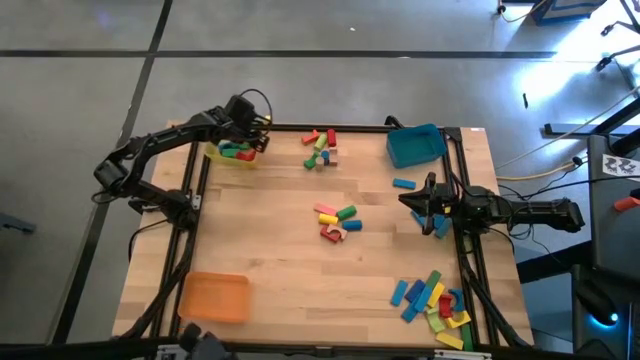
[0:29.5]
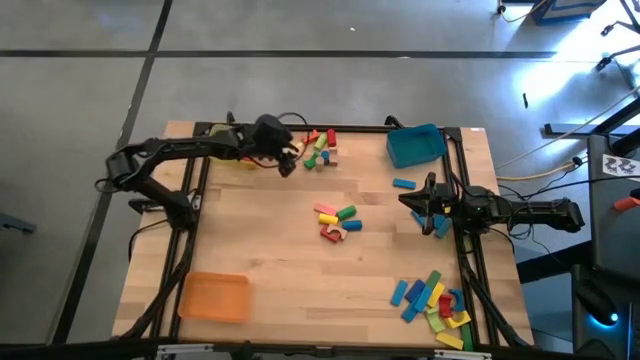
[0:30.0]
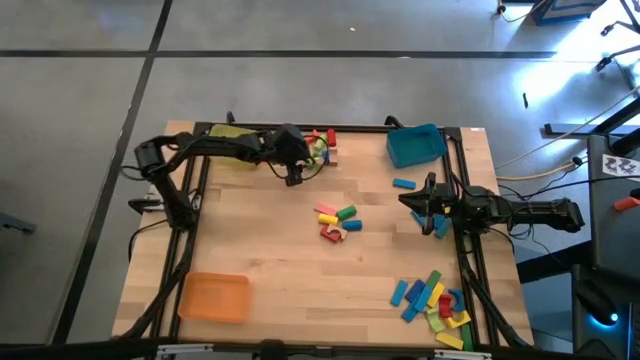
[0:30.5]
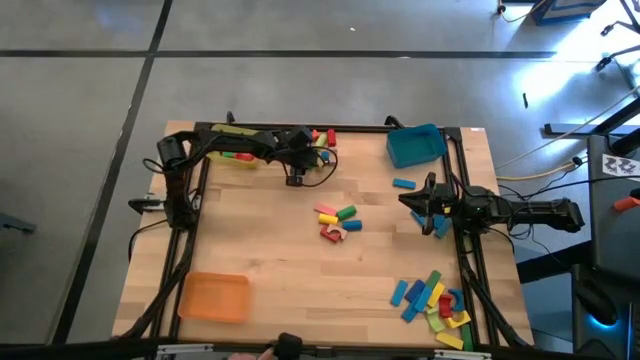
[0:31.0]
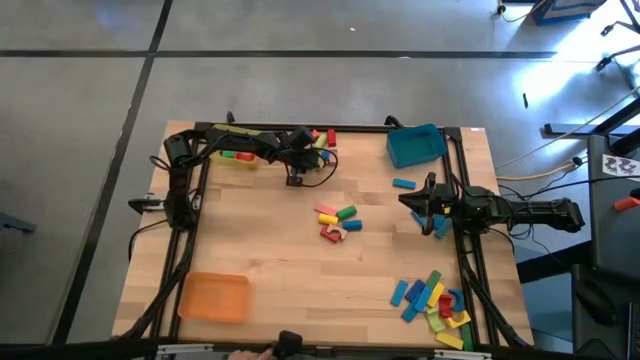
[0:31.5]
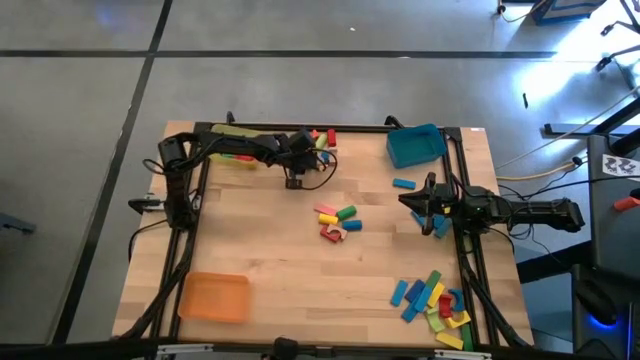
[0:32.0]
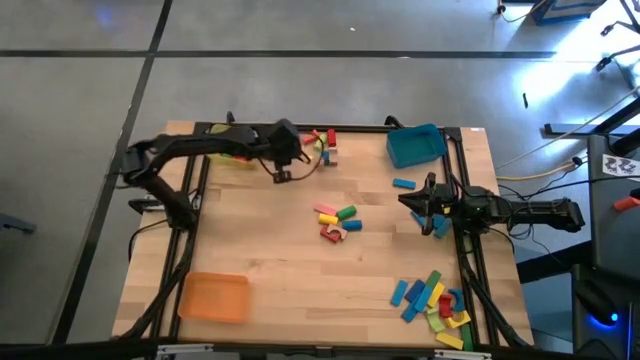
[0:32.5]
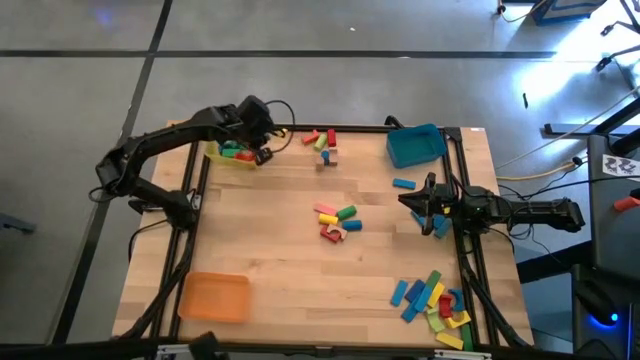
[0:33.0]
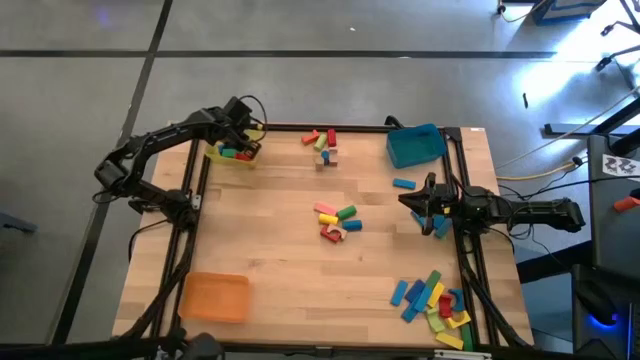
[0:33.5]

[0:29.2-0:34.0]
Task: Sort blocks by size
Put the green arch block into the yellow bin

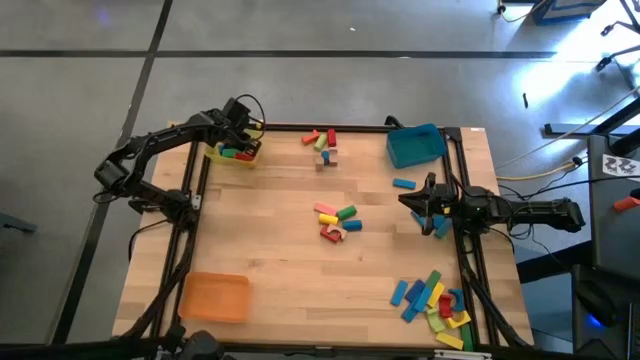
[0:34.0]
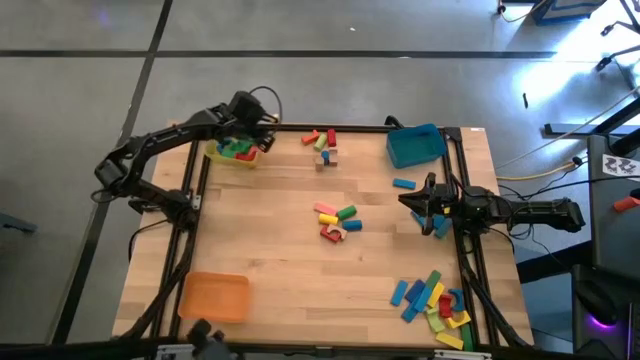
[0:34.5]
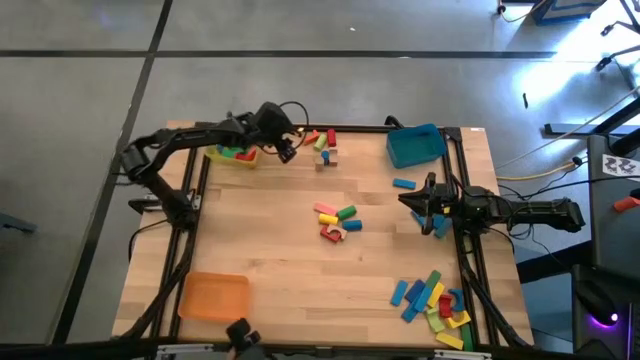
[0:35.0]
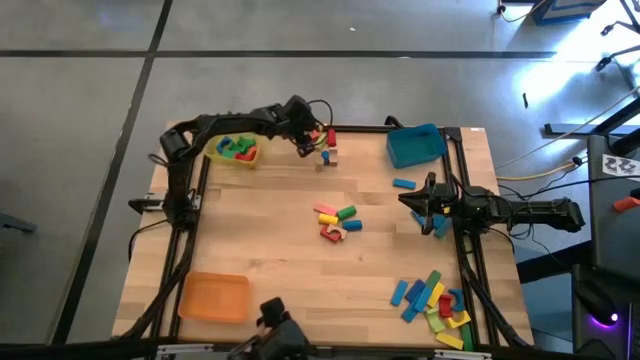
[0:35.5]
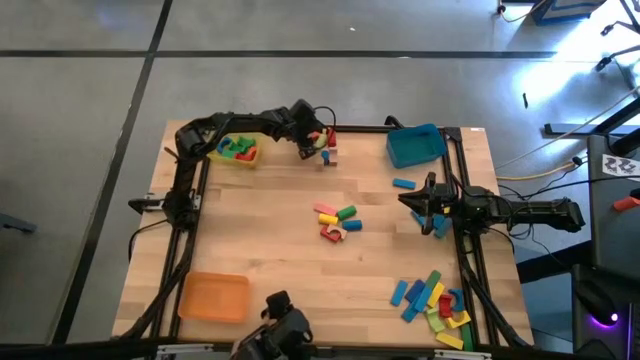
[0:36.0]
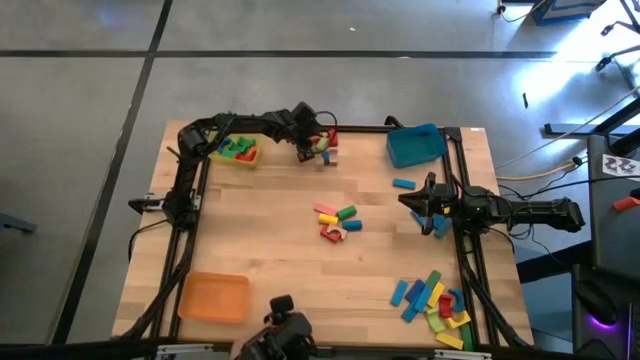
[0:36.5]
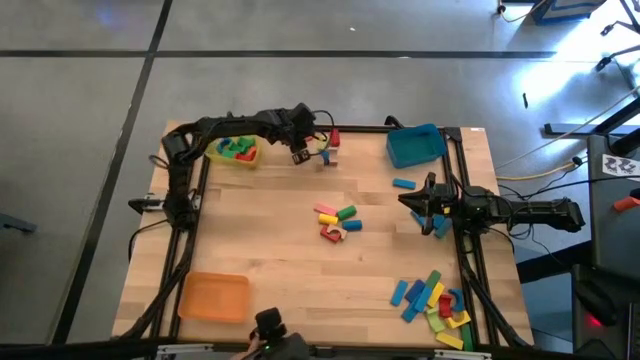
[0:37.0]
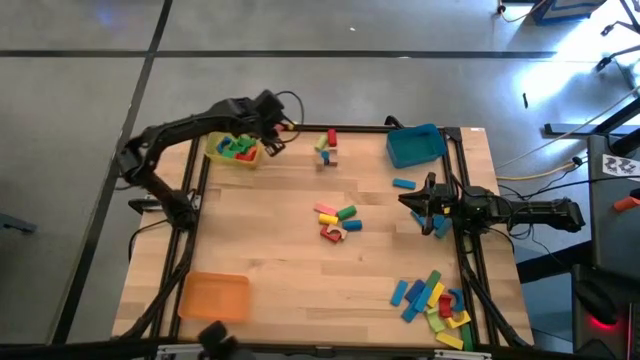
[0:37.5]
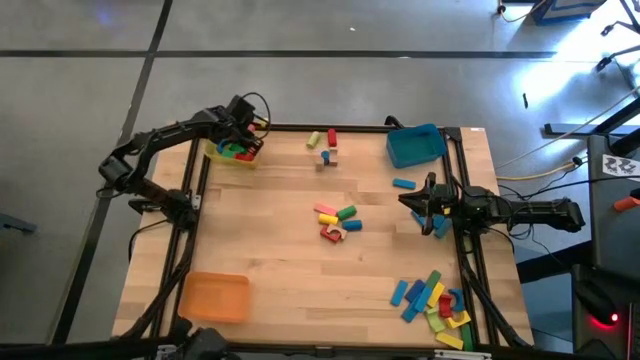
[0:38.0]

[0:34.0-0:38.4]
Put the orange arch block into the yellow bin

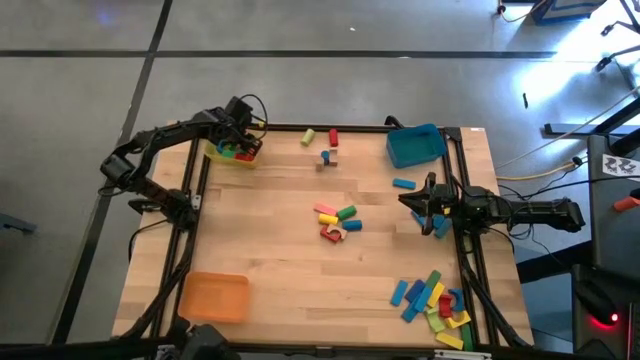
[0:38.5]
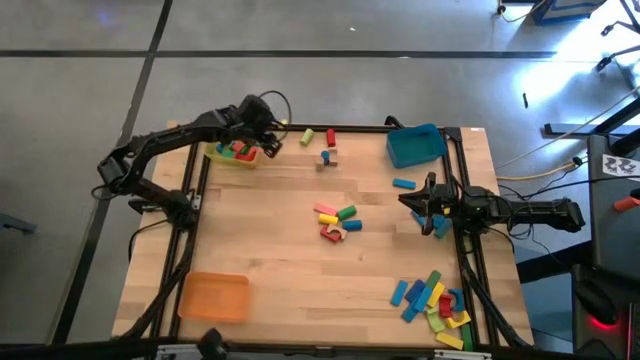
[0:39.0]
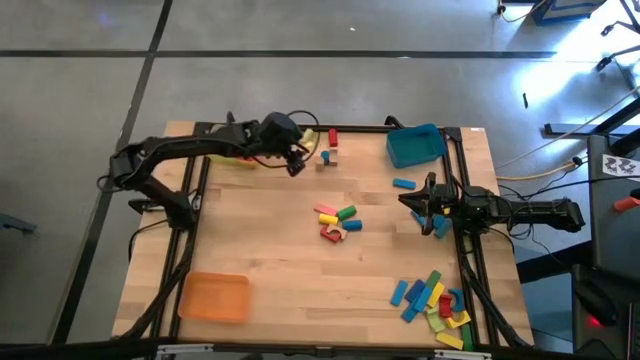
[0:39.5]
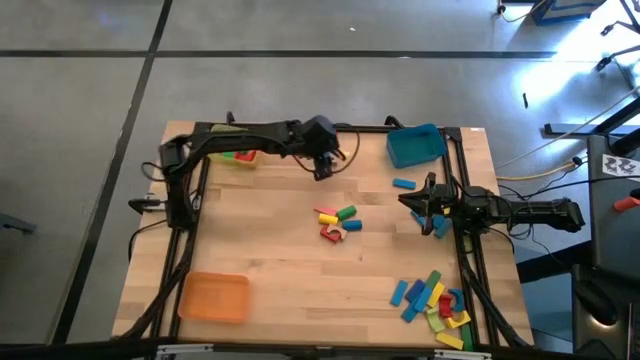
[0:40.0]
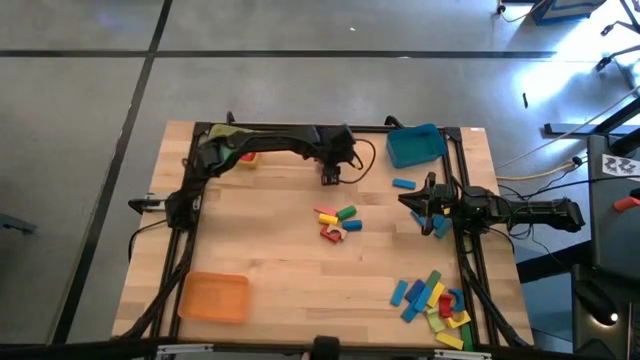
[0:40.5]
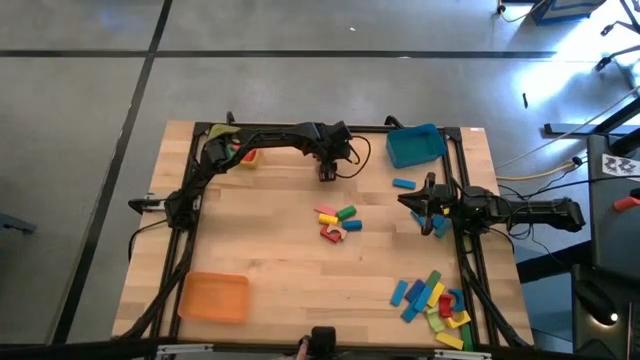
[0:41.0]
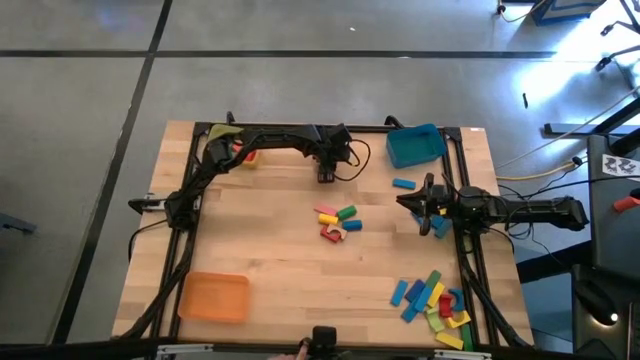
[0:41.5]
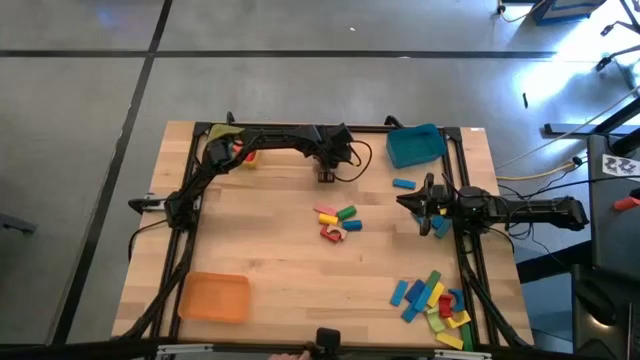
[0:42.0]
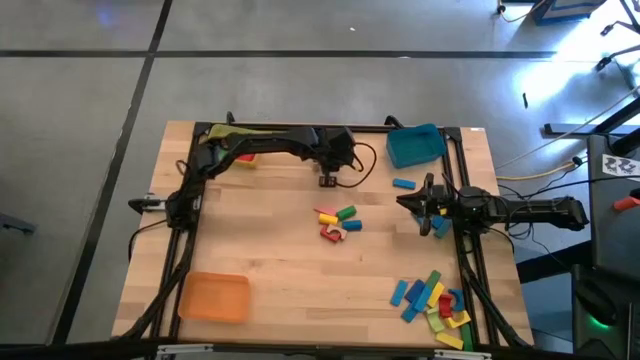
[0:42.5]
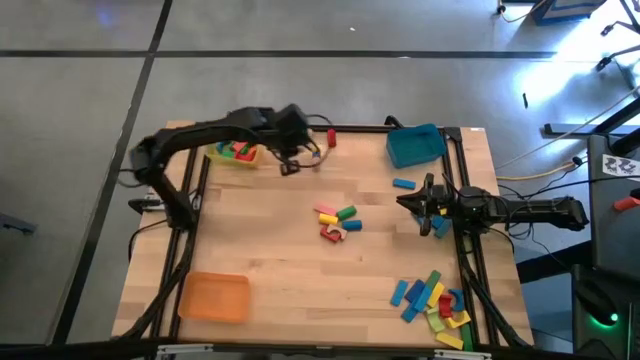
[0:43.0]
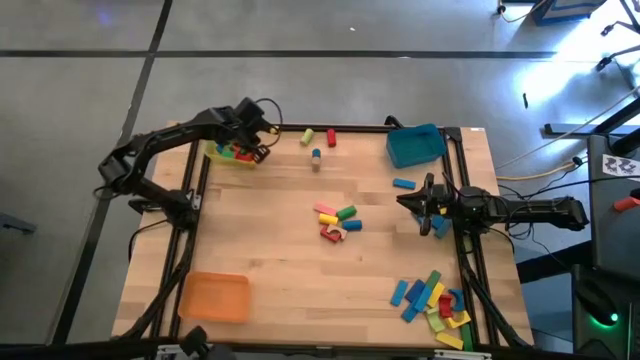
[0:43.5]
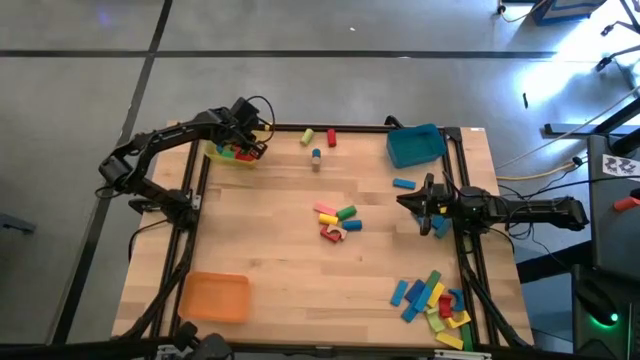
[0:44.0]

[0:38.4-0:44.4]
Put the brown arch block into the yellow bin

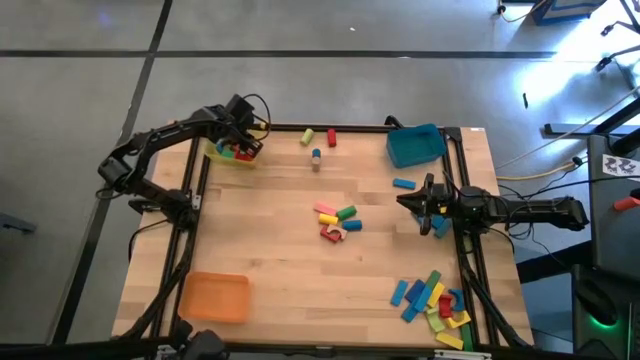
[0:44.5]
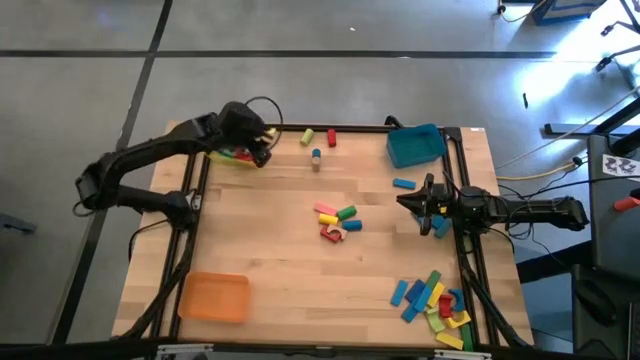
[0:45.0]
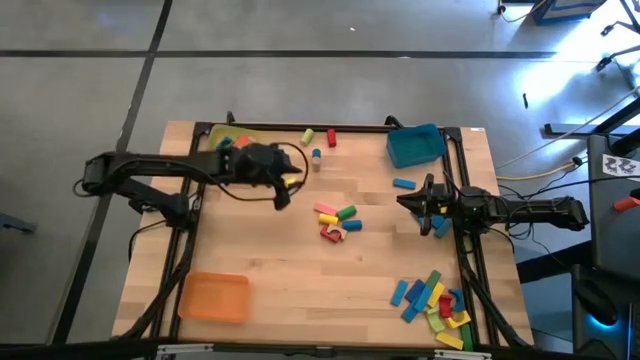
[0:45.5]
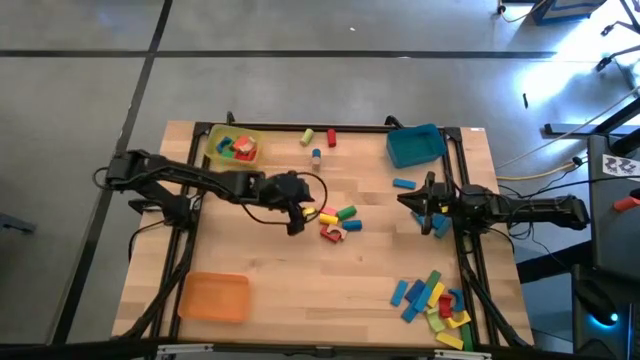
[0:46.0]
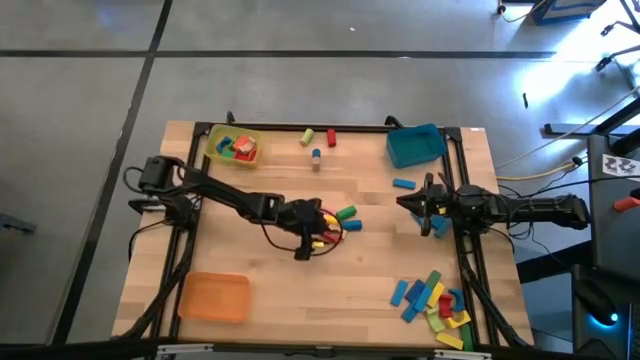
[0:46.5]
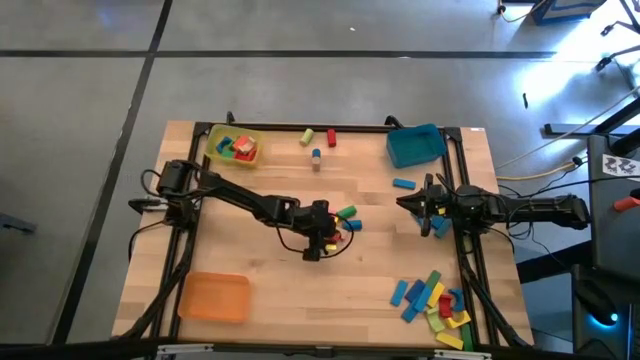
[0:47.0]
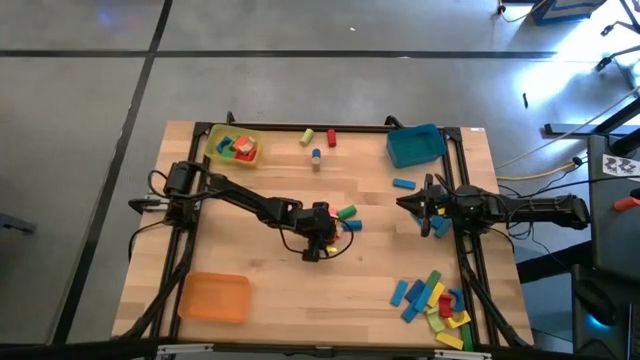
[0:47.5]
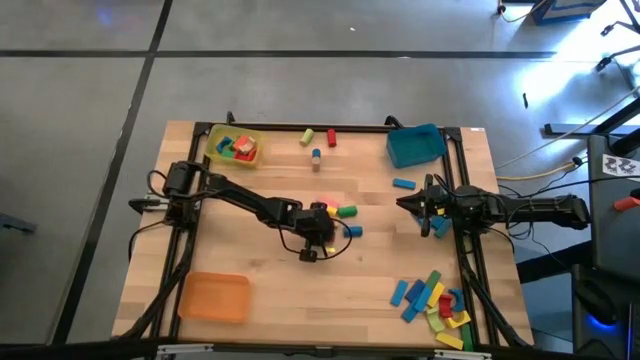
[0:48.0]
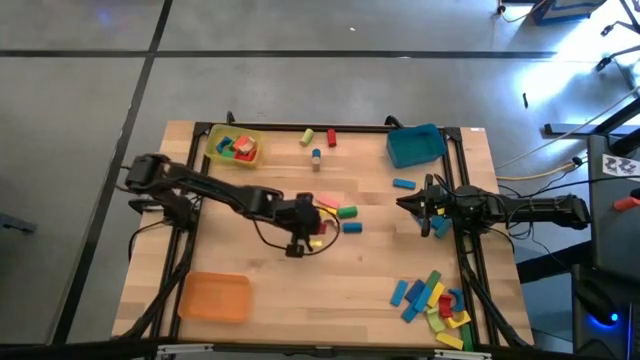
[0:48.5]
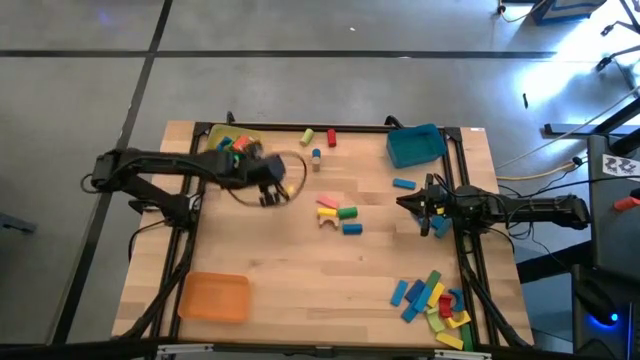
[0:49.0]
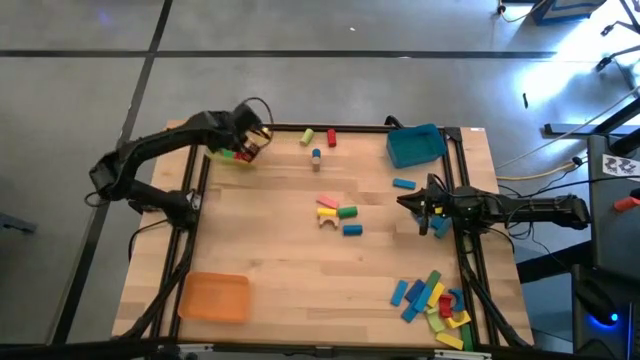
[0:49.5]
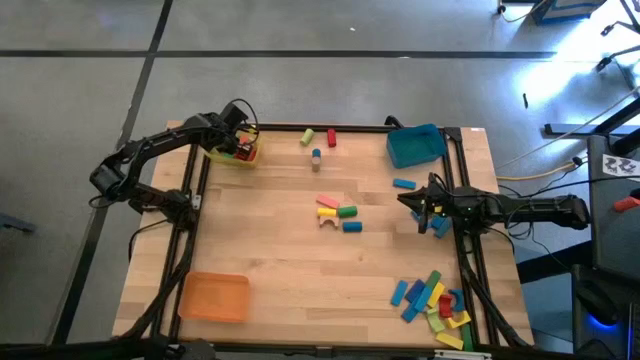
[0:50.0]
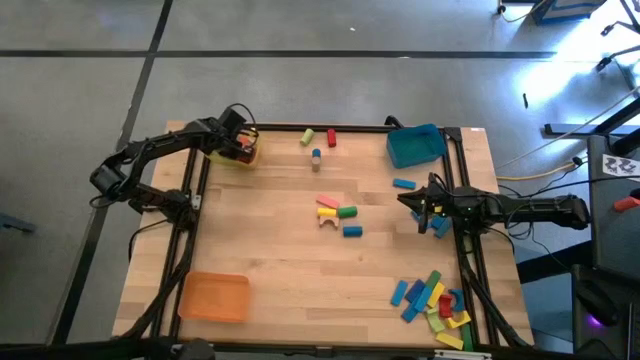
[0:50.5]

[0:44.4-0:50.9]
Put the red arch block into the yellow bin
